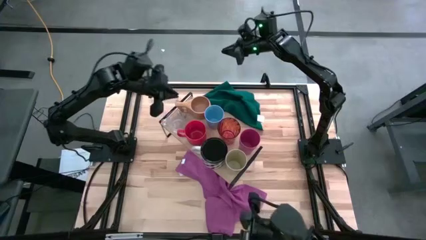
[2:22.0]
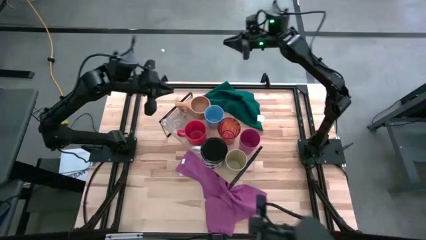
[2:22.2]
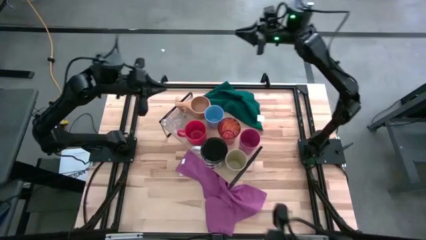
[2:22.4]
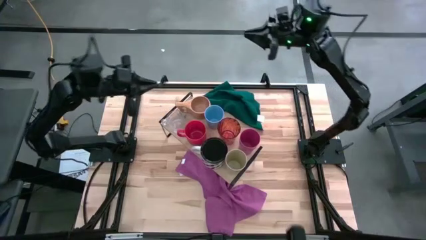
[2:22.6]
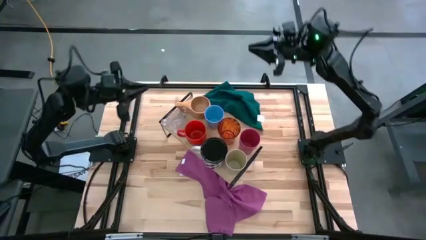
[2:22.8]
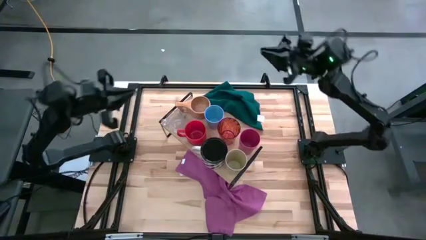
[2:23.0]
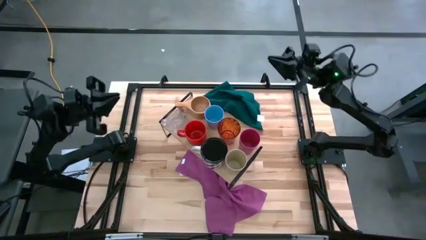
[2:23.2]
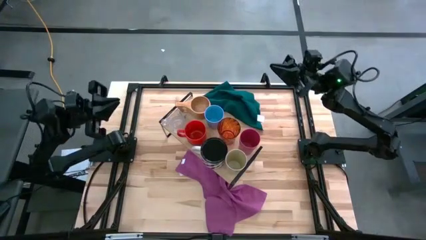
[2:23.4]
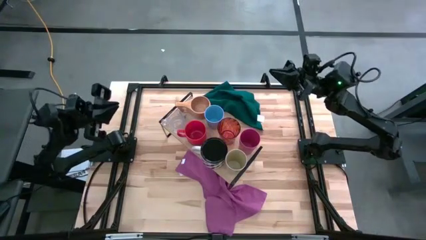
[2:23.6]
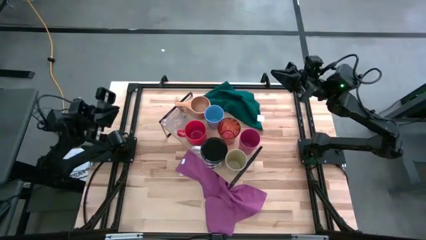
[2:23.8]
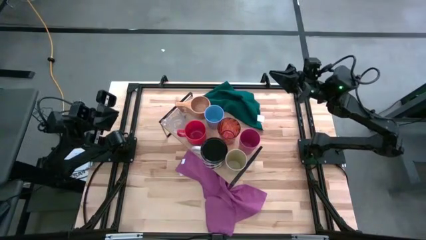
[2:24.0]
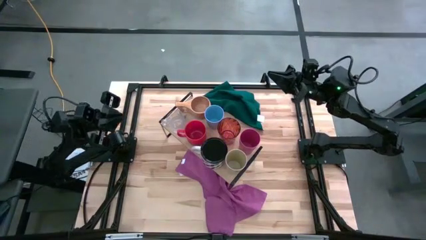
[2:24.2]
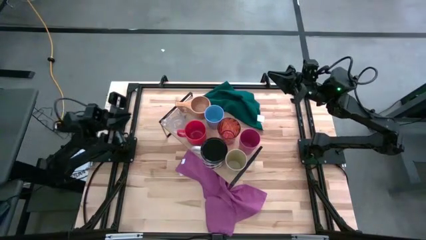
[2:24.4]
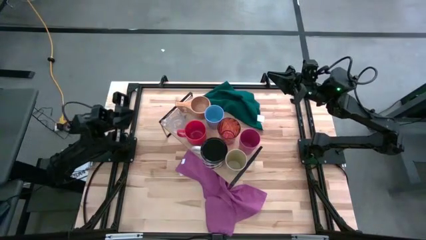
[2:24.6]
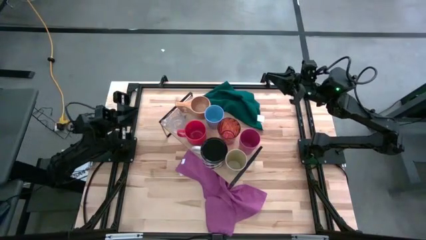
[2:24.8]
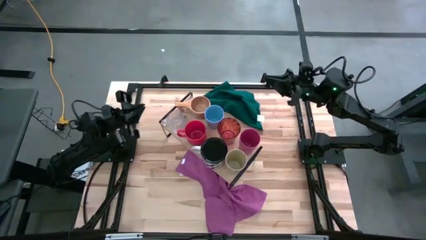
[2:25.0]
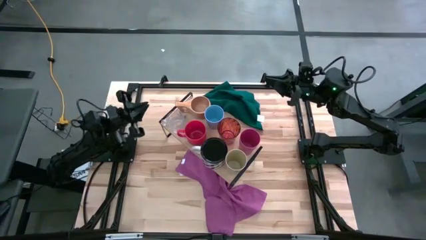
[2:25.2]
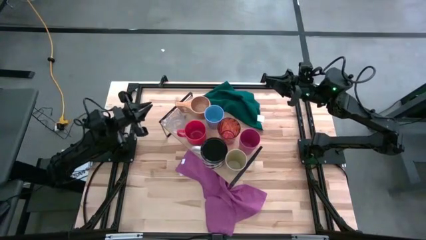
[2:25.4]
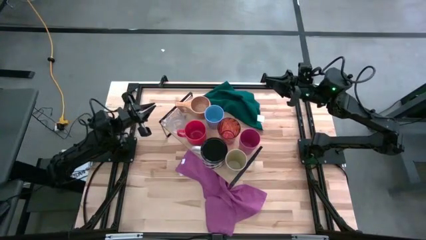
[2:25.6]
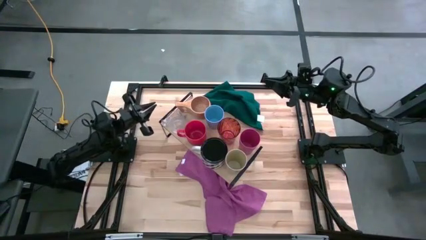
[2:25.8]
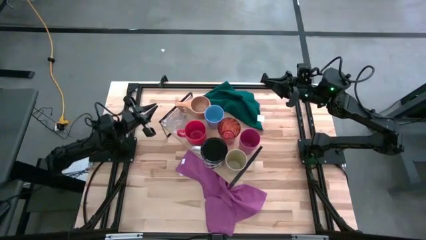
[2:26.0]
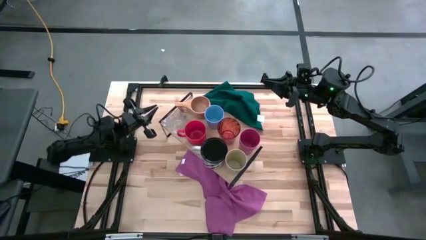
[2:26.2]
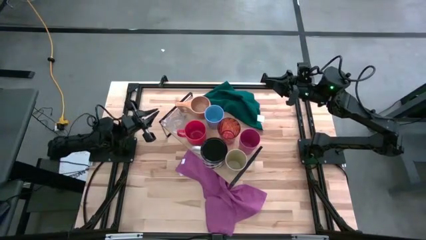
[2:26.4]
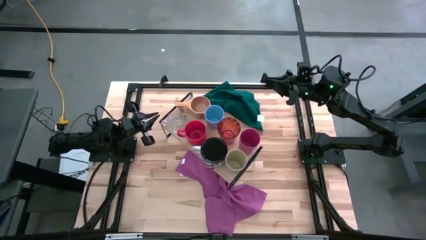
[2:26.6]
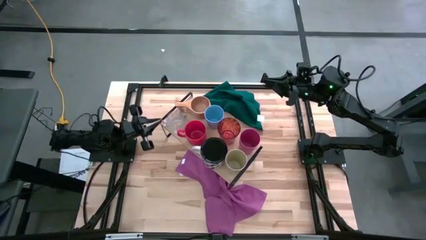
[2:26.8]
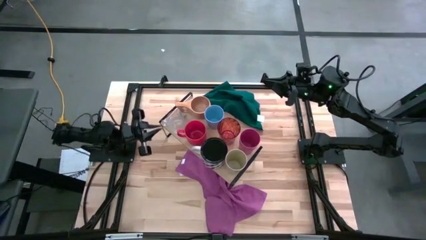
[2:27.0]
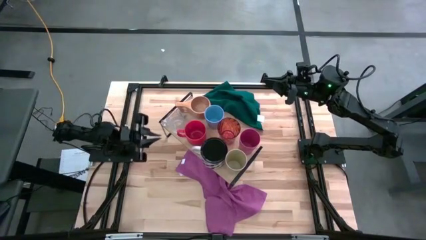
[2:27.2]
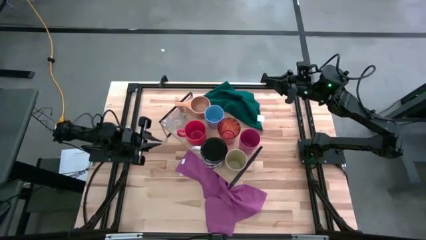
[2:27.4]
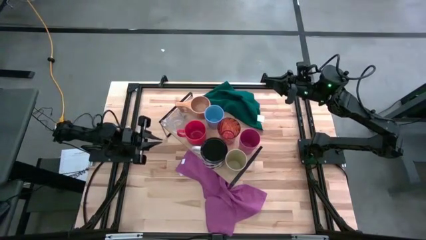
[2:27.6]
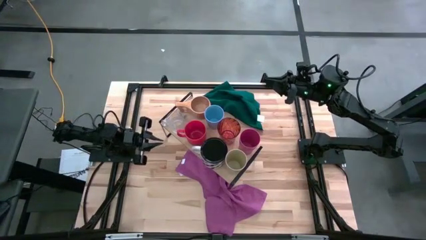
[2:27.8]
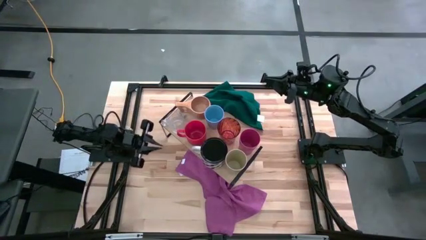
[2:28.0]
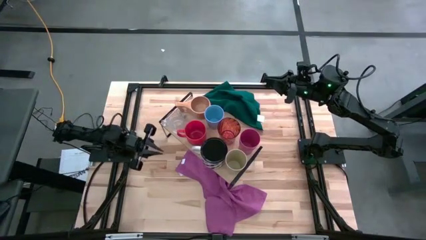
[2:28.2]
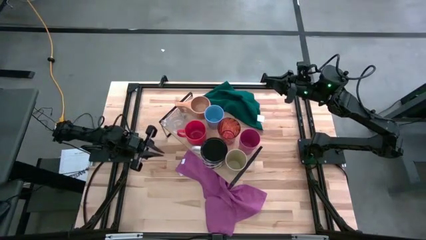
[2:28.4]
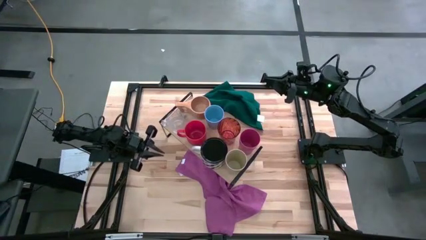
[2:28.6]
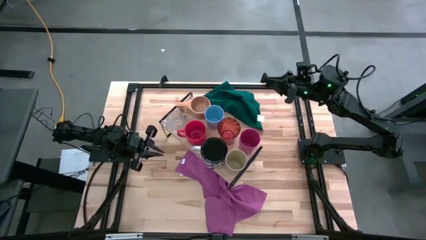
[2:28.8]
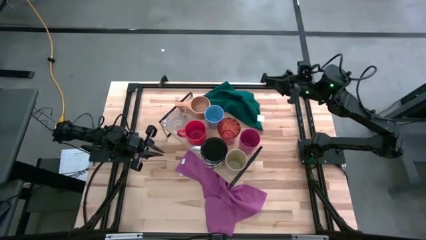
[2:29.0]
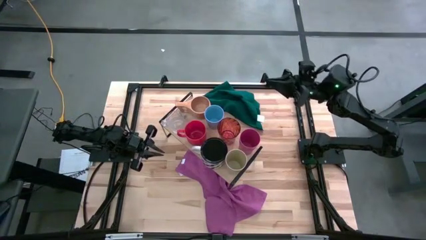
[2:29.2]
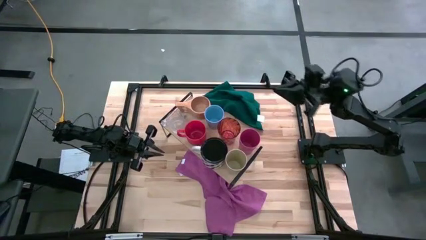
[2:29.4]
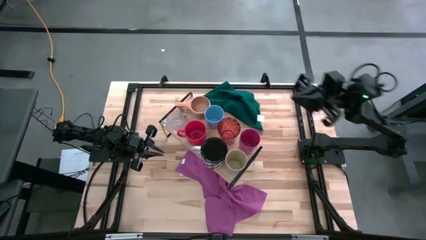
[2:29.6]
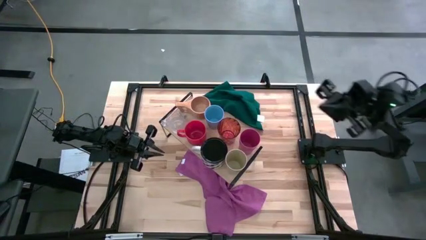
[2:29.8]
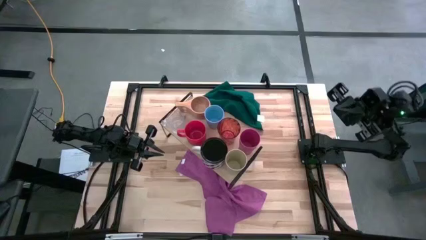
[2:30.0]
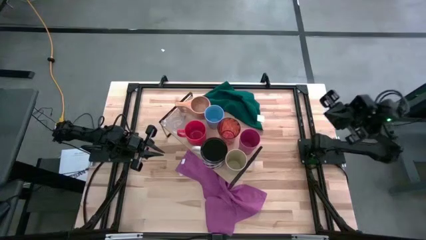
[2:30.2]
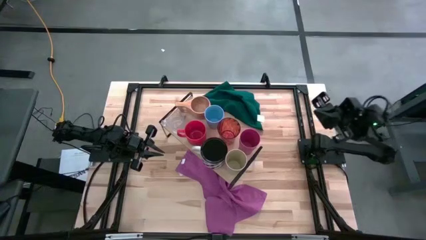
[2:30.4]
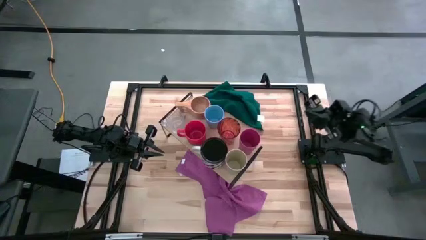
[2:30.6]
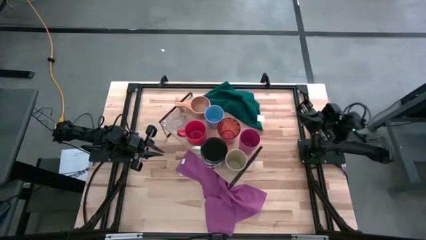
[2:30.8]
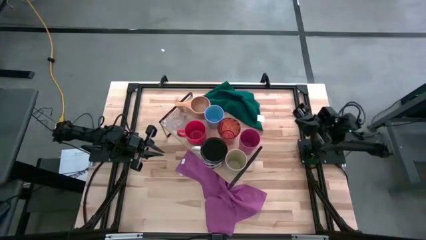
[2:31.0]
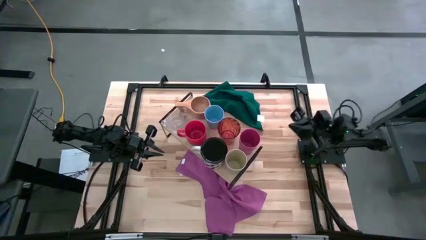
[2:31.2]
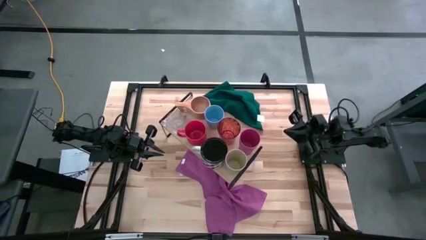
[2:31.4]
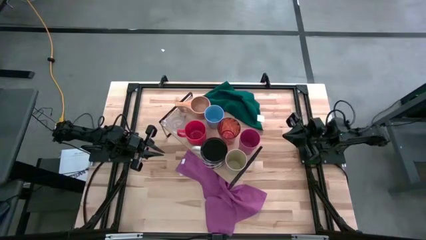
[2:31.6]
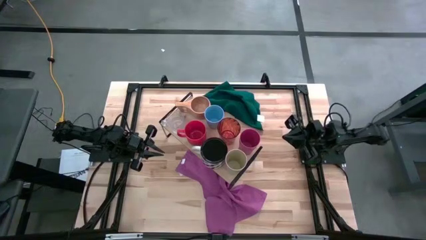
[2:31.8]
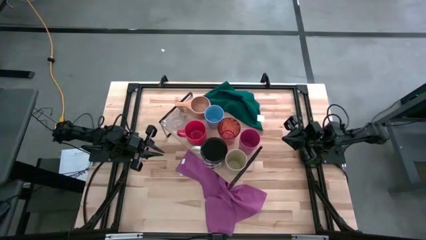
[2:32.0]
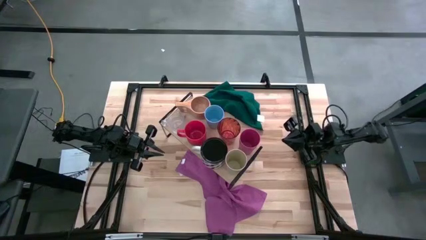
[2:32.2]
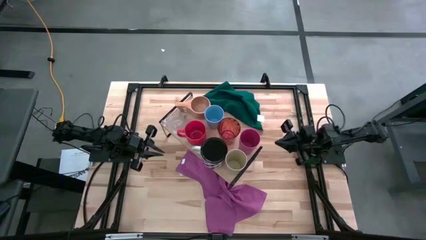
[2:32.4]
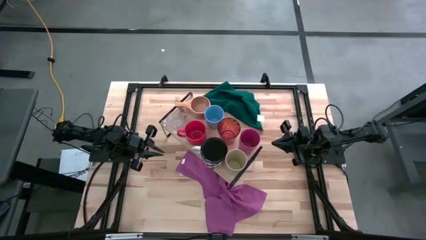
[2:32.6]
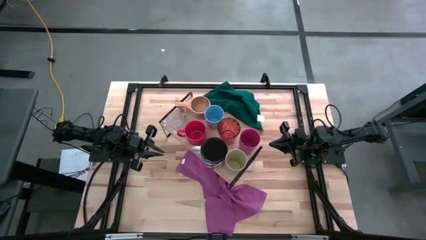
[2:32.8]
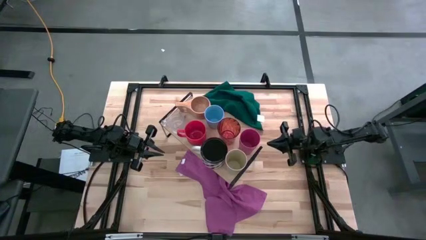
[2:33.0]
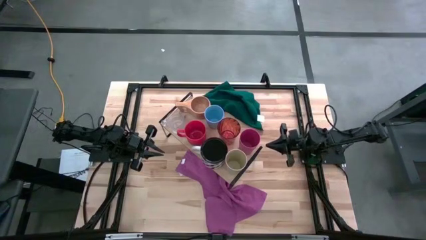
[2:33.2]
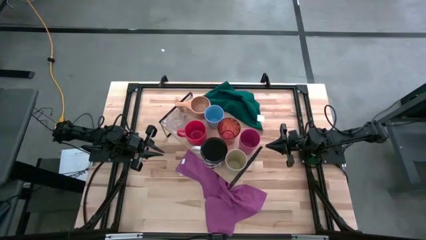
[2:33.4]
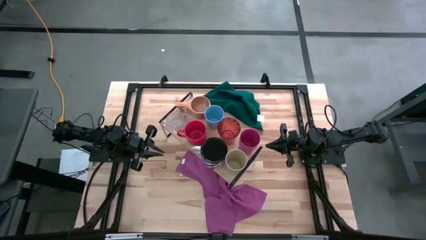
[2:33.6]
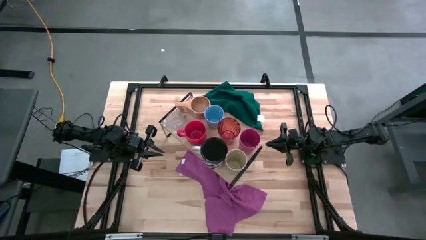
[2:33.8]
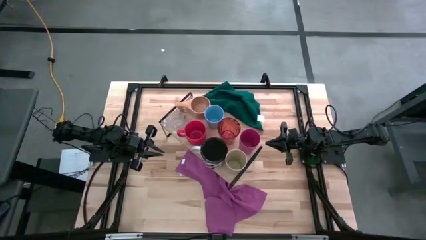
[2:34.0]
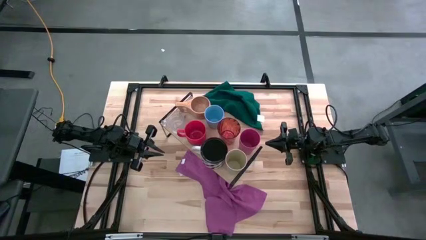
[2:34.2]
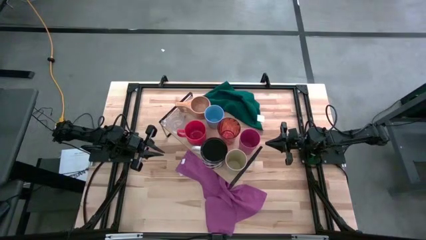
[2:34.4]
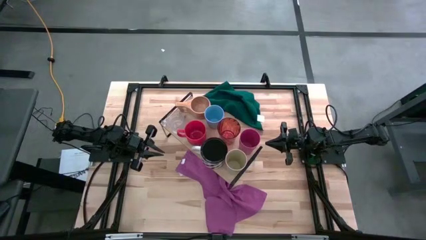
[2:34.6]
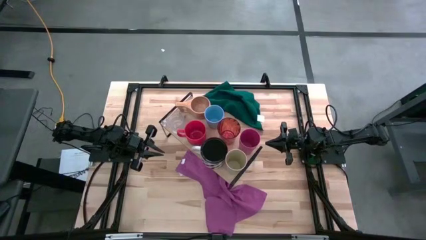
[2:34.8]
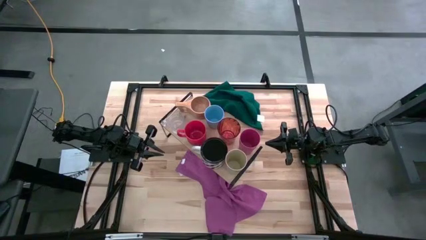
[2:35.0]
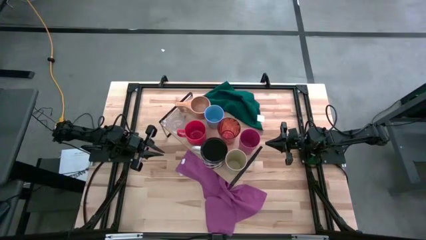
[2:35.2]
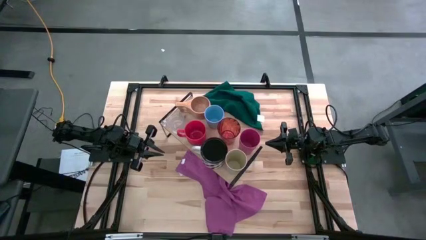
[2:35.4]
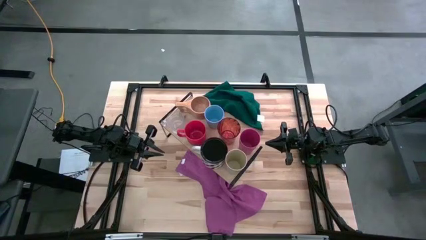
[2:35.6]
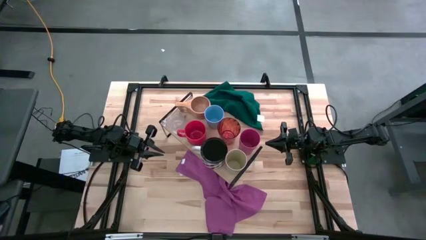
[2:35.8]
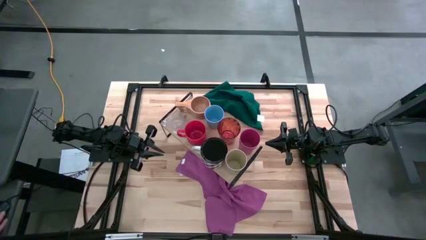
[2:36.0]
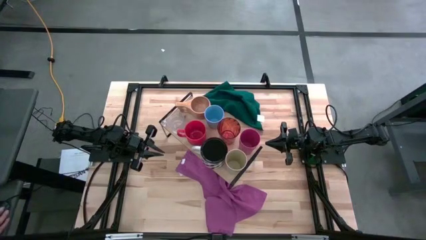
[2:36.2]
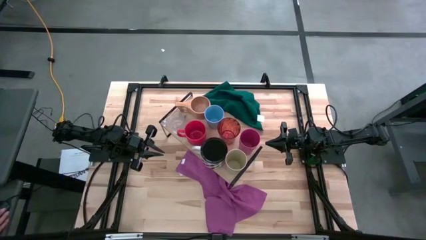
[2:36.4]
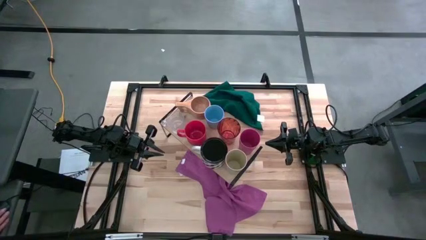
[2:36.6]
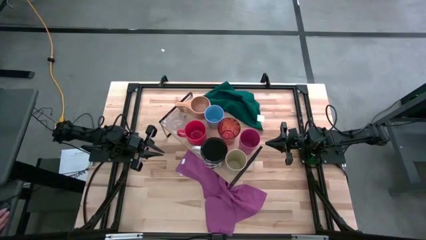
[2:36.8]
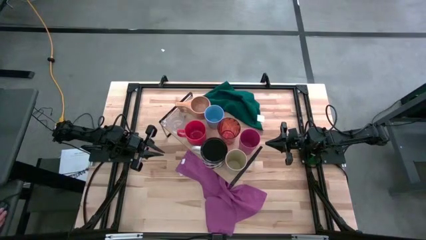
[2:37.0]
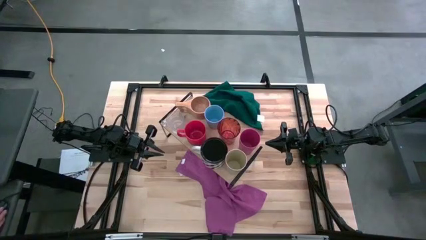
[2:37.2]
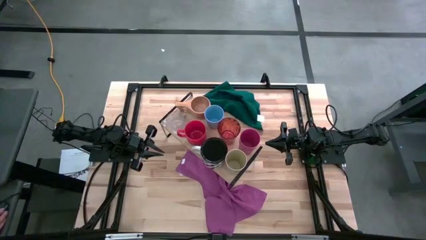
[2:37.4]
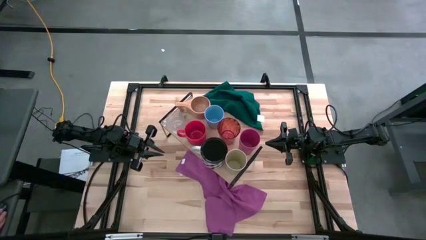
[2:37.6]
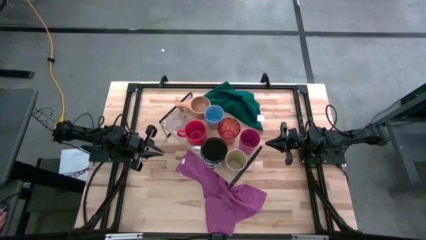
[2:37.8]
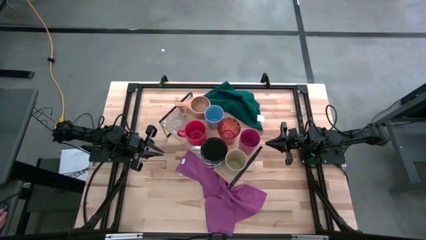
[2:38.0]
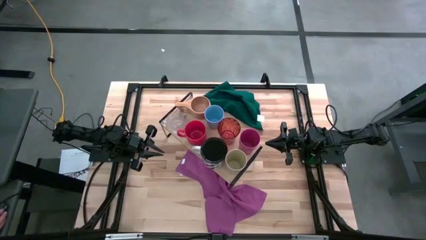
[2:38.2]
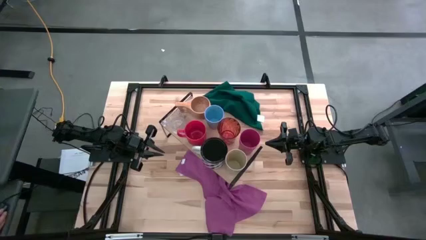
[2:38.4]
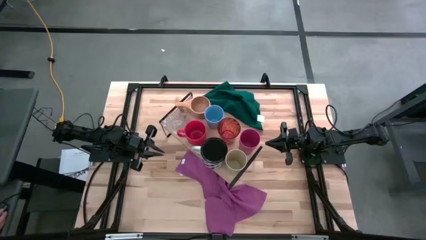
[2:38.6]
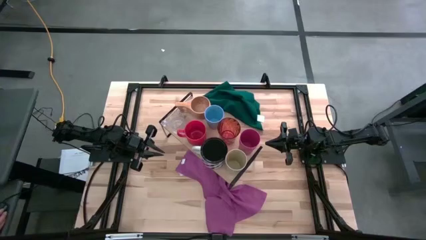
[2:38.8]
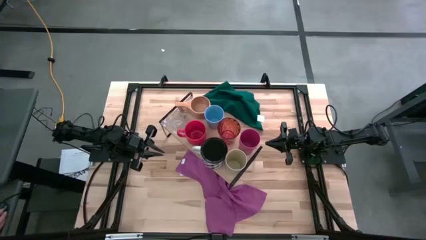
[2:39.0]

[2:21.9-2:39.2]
Task: Stack small to large cups/mugs on shelf
Return to Home Position
